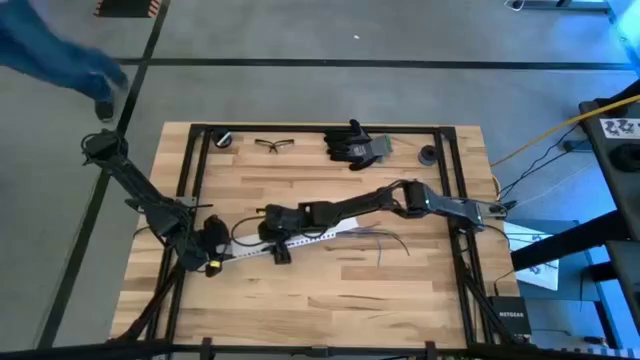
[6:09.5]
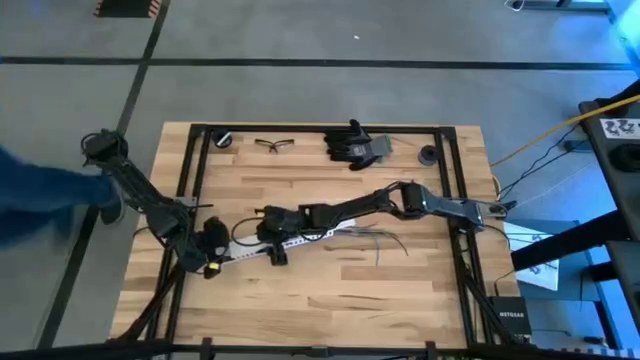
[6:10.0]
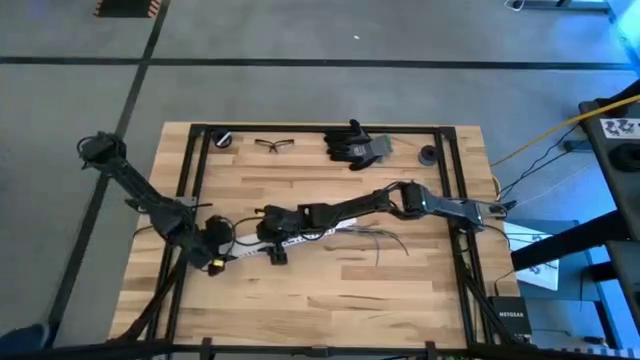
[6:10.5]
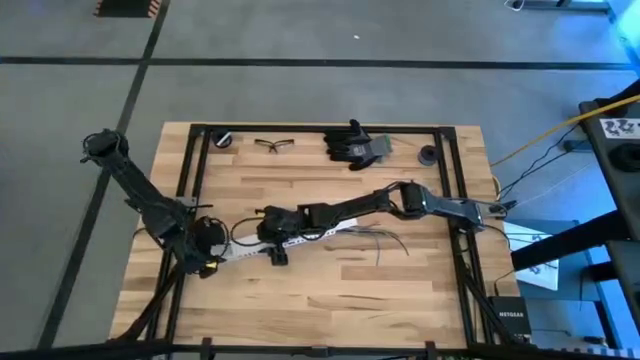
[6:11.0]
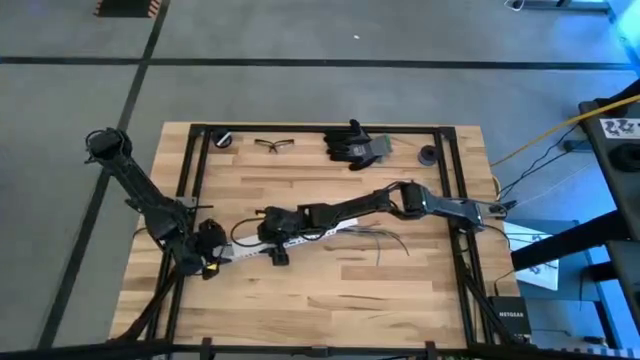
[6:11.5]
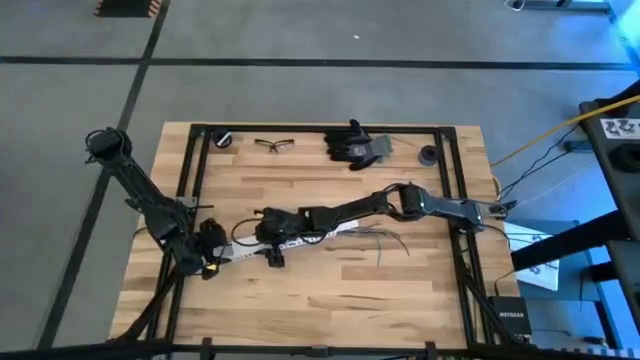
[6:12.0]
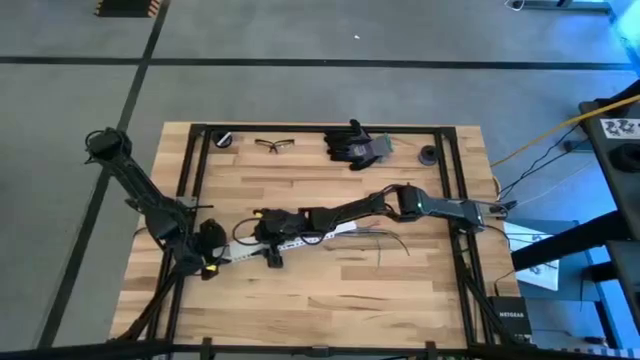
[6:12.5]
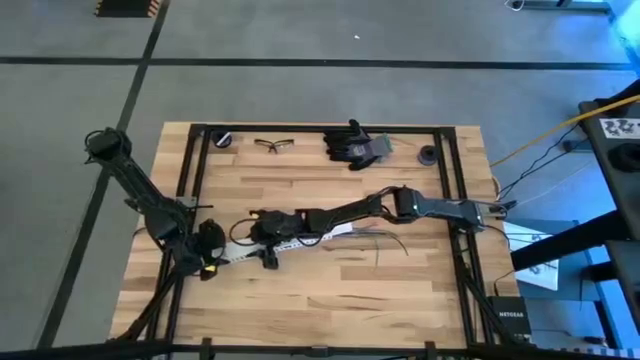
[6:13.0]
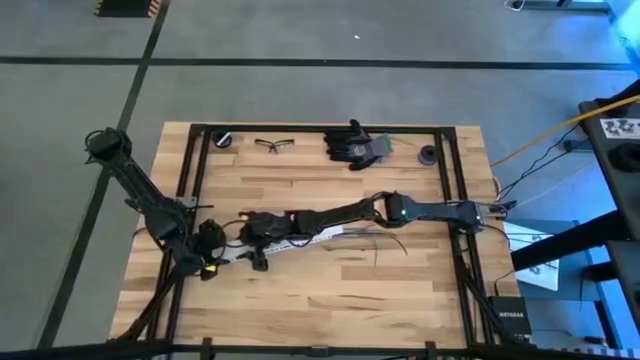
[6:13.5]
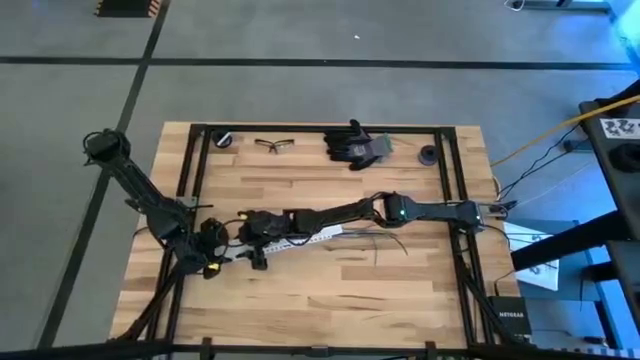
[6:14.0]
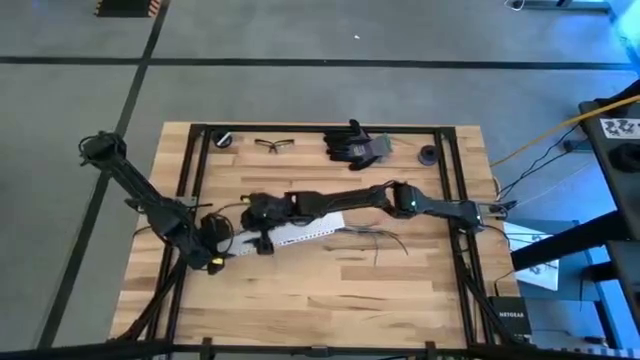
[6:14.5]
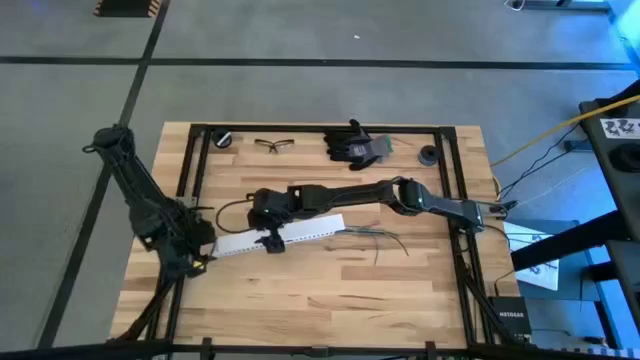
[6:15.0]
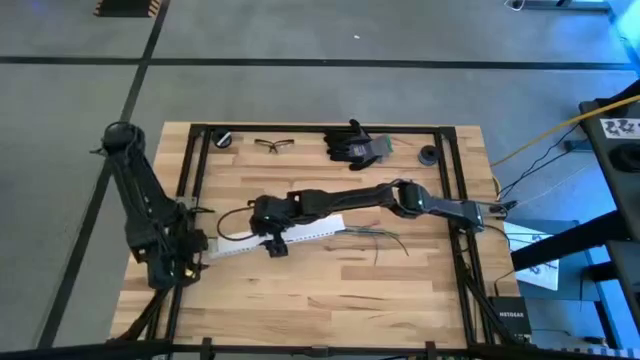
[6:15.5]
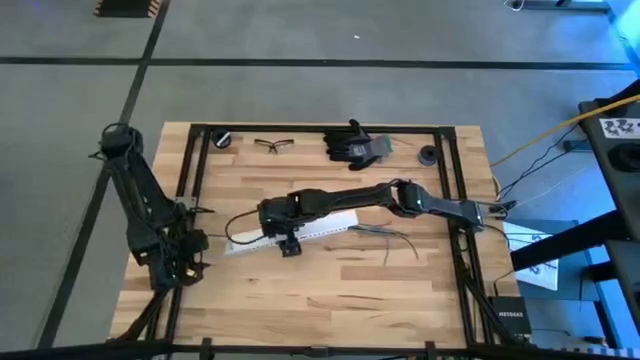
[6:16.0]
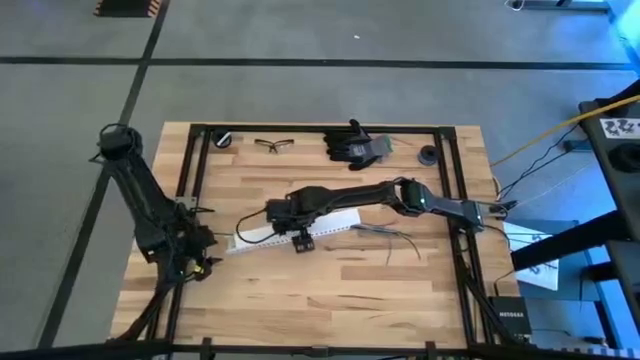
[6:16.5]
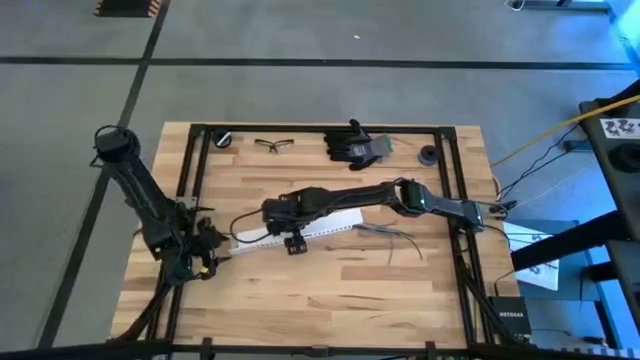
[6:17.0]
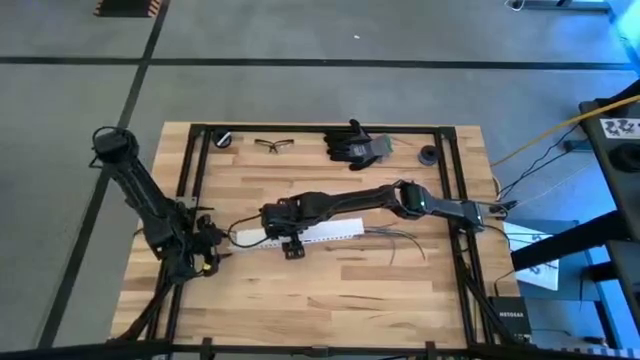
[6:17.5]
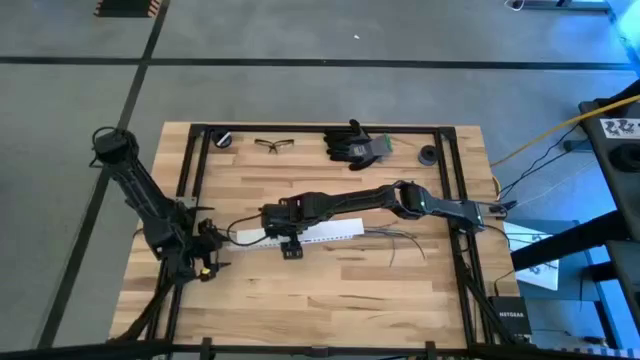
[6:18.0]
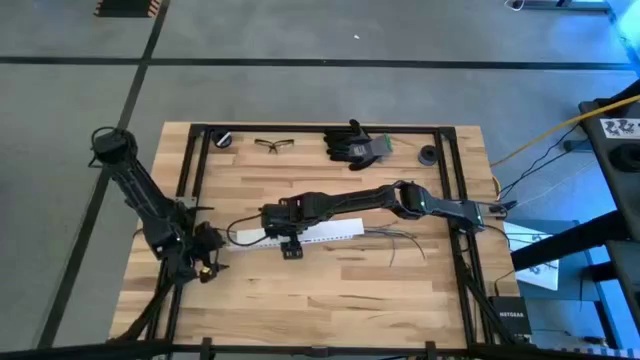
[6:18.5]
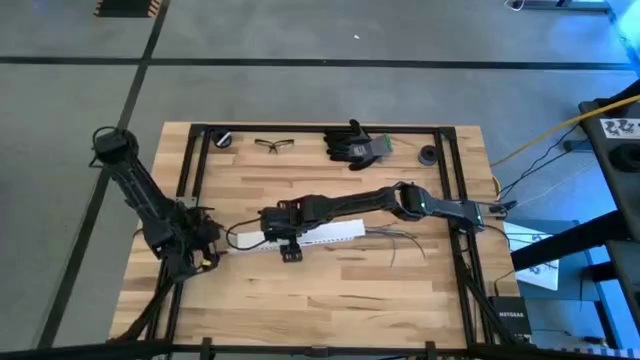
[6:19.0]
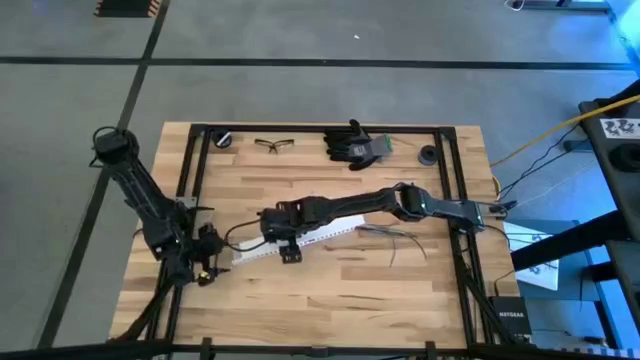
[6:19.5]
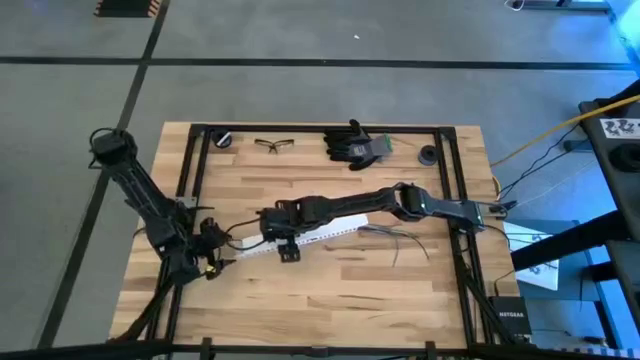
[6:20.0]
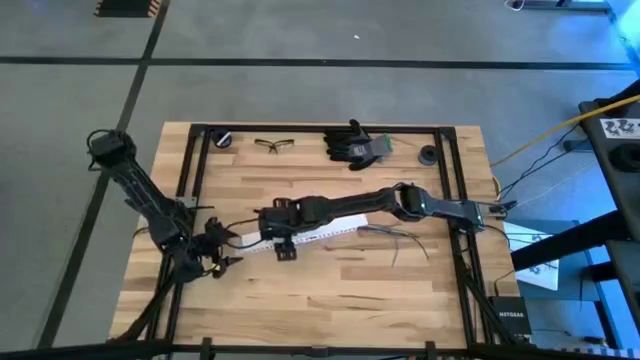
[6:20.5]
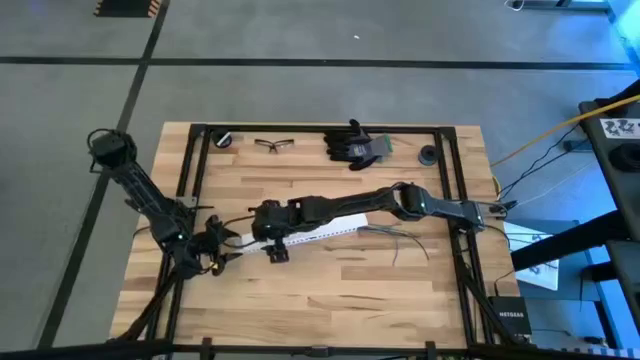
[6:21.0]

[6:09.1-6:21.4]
Task: Ziptie cables
Close the white cable duct

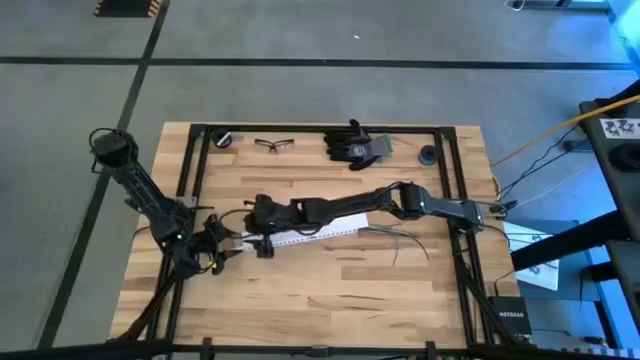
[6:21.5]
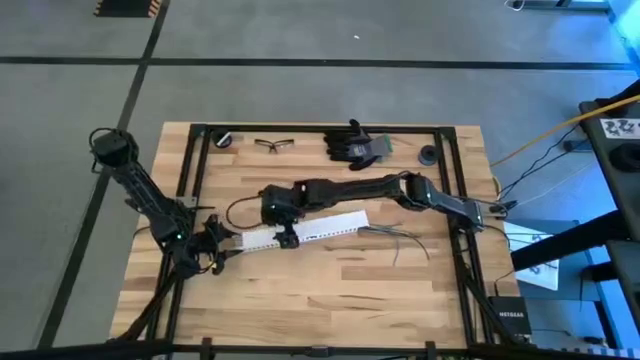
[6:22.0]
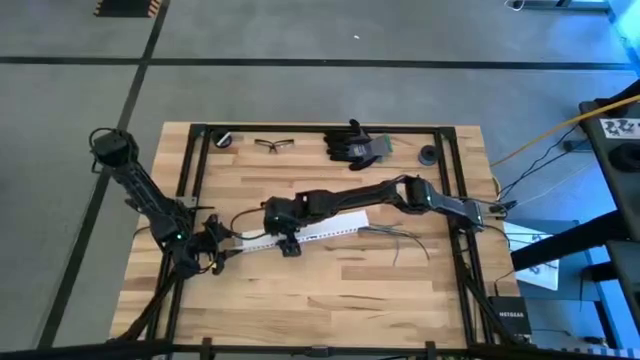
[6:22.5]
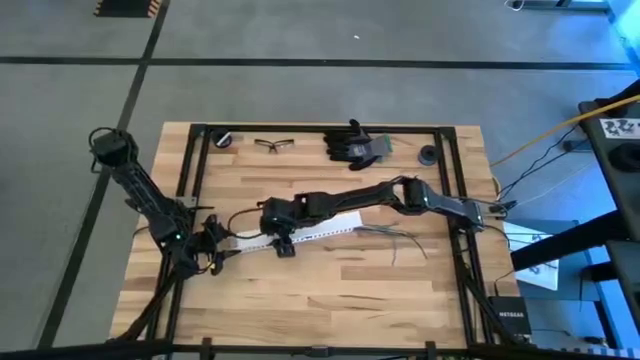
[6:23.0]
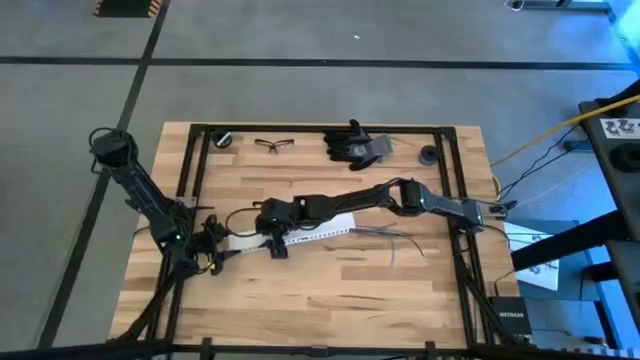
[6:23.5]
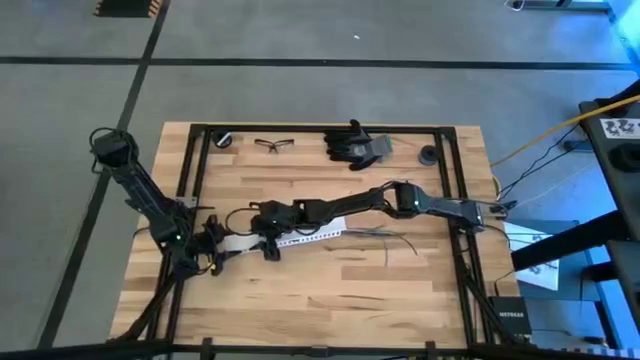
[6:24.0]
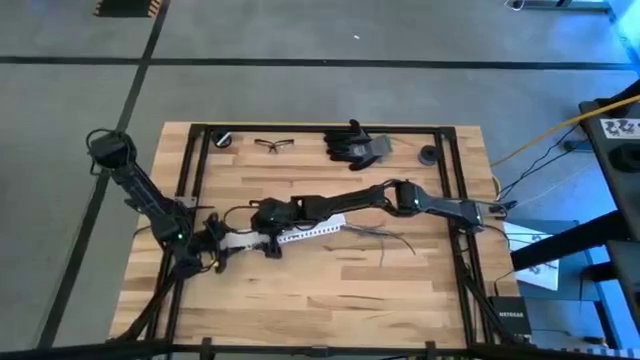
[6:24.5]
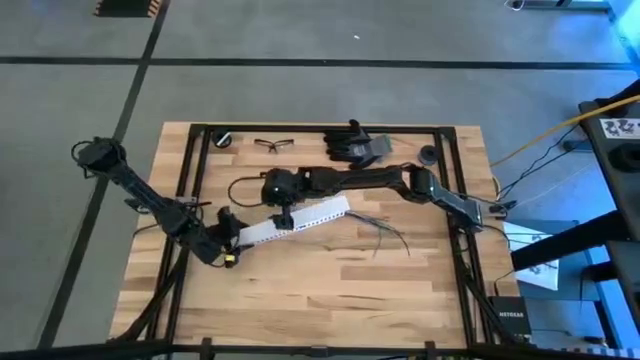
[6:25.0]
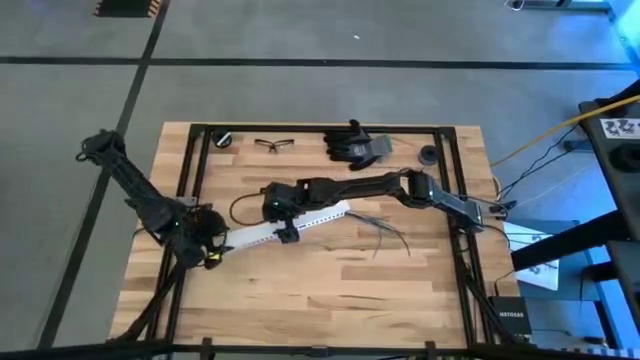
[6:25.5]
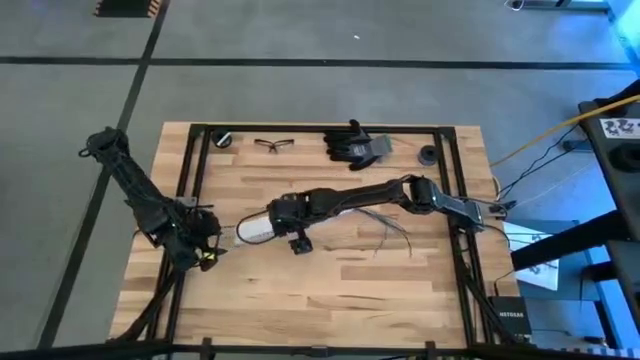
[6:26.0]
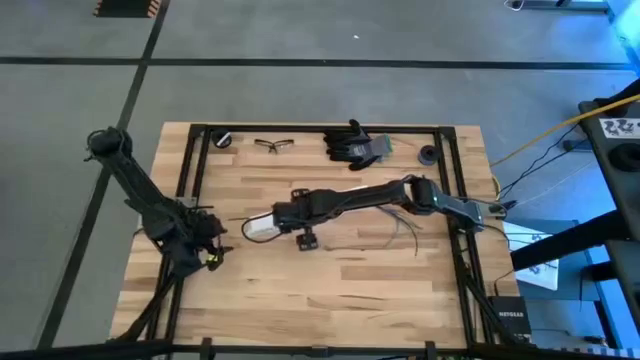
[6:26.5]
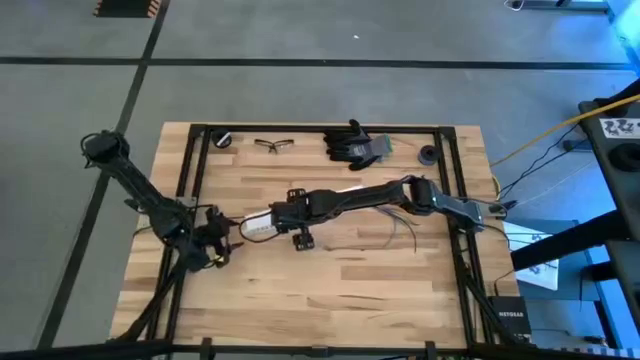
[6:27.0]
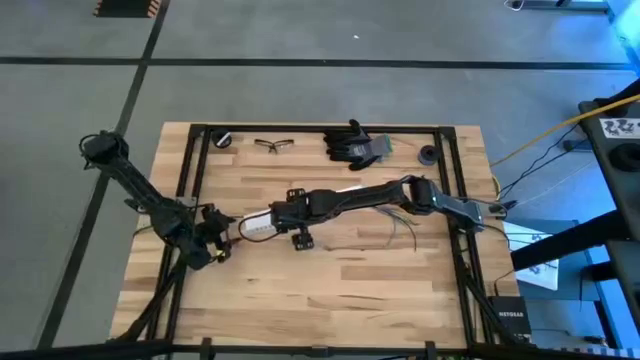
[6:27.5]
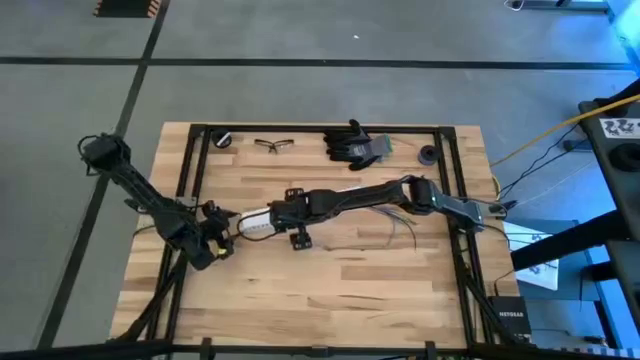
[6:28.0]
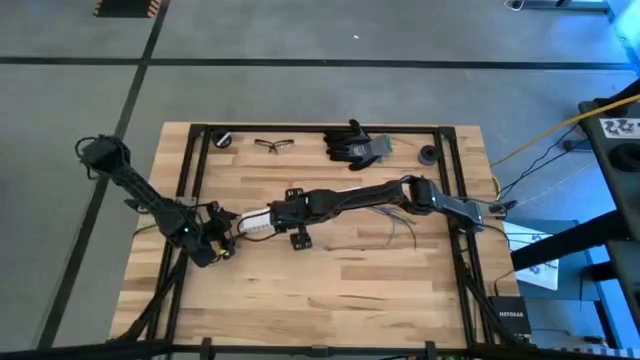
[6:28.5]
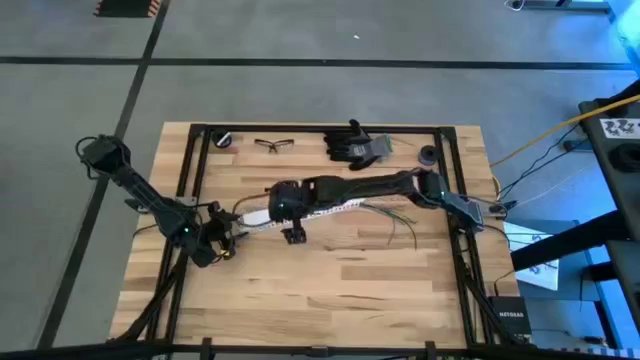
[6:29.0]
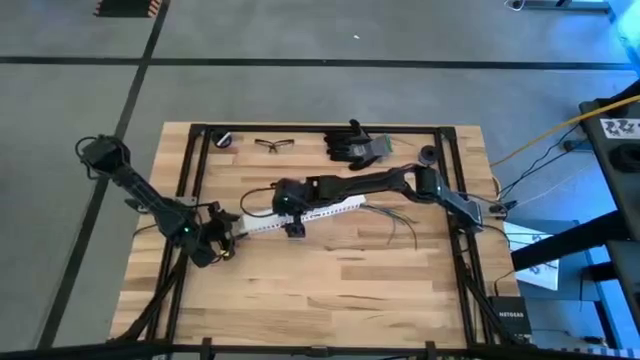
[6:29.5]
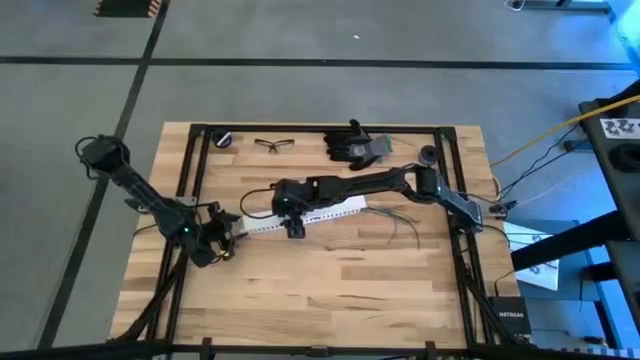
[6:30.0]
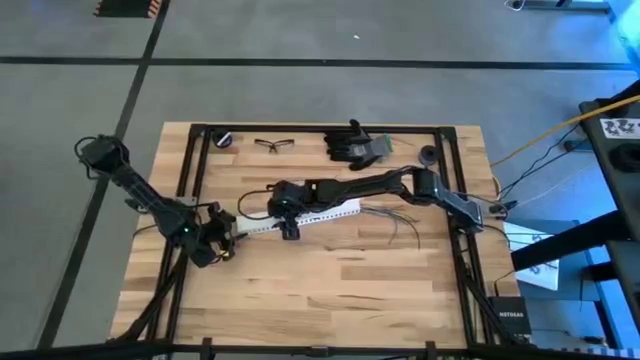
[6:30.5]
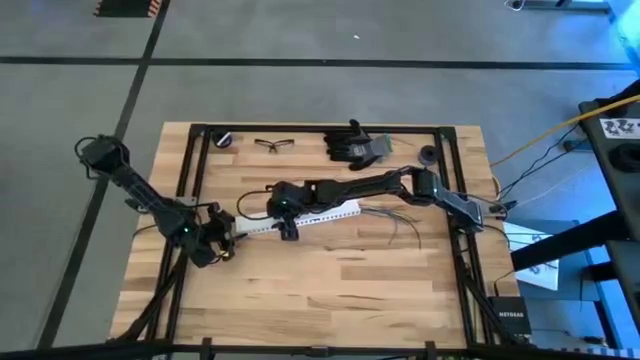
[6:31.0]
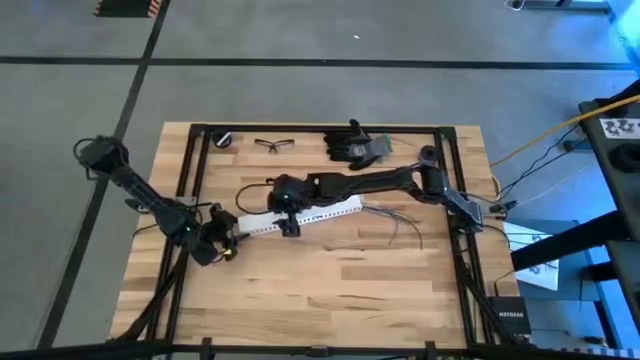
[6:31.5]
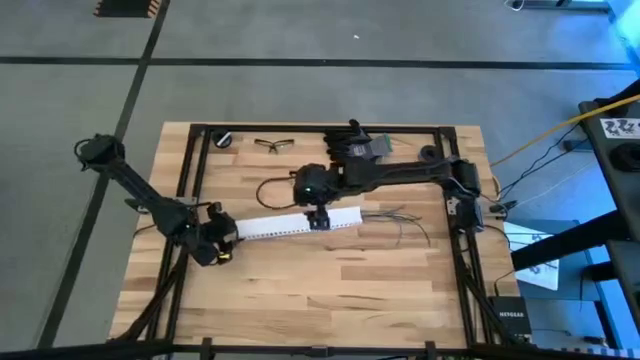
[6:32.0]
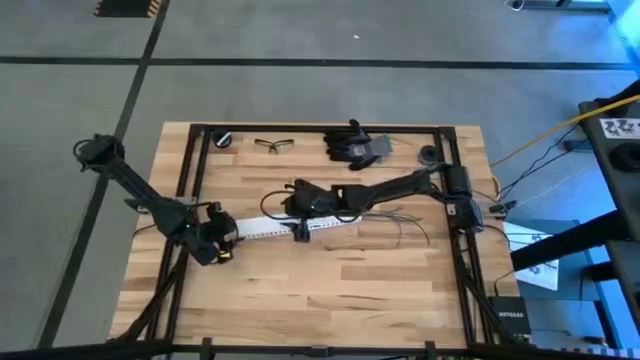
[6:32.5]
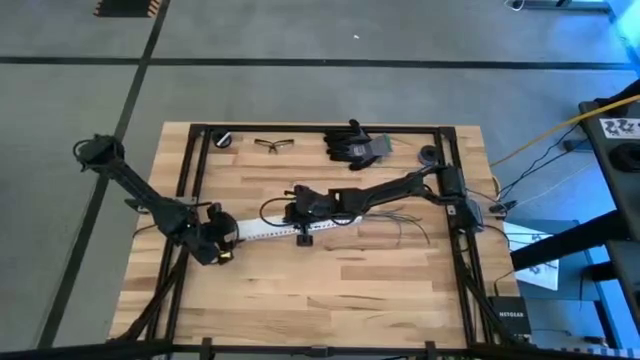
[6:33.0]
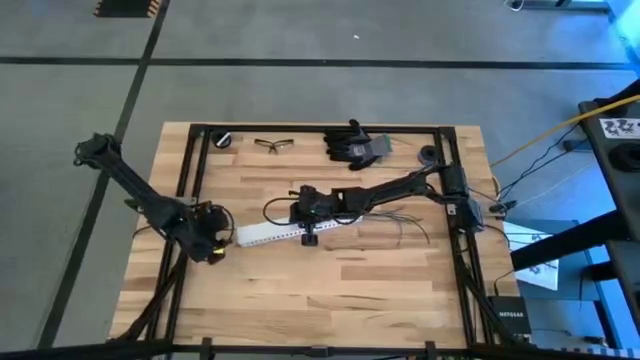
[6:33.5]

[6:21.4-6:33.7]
Close the white cable duct
